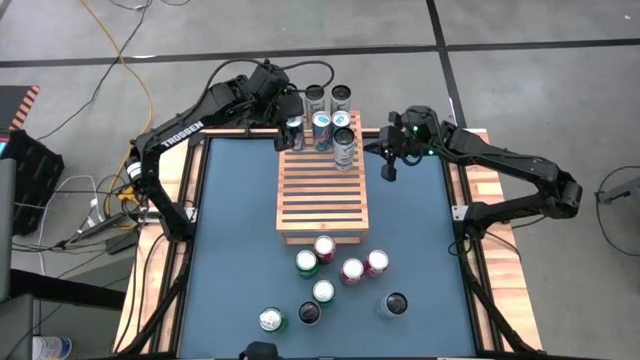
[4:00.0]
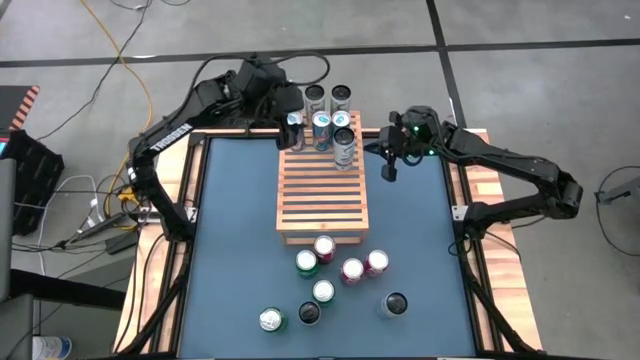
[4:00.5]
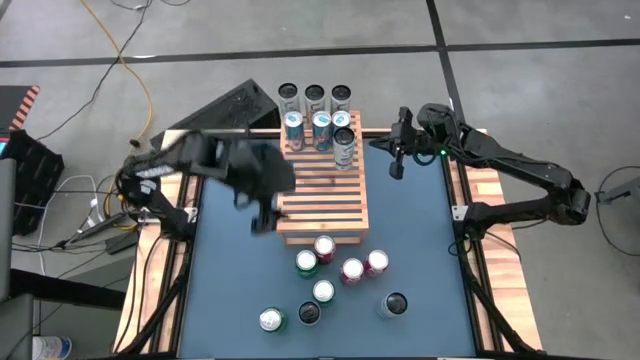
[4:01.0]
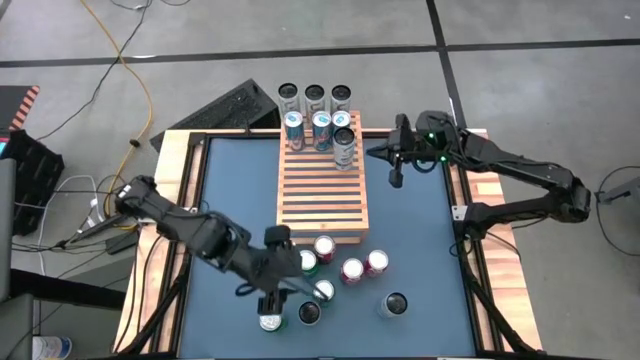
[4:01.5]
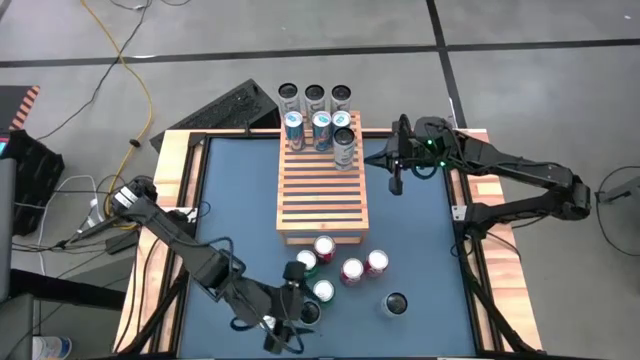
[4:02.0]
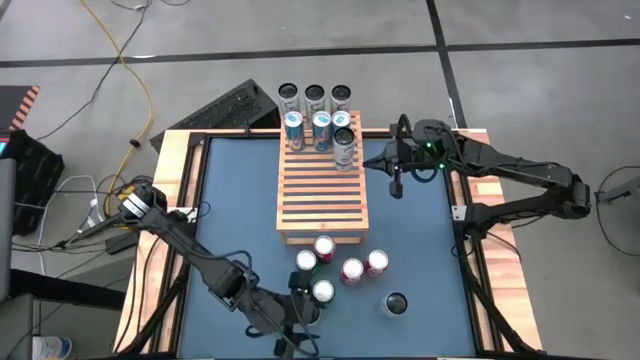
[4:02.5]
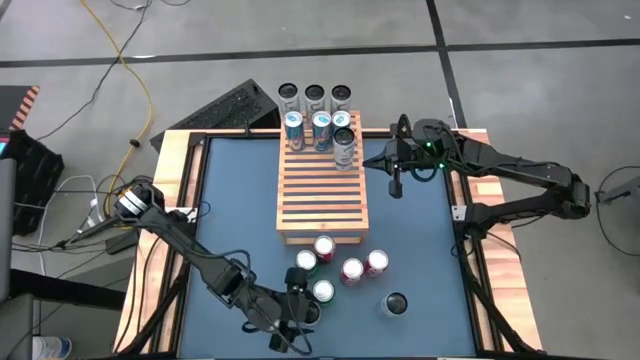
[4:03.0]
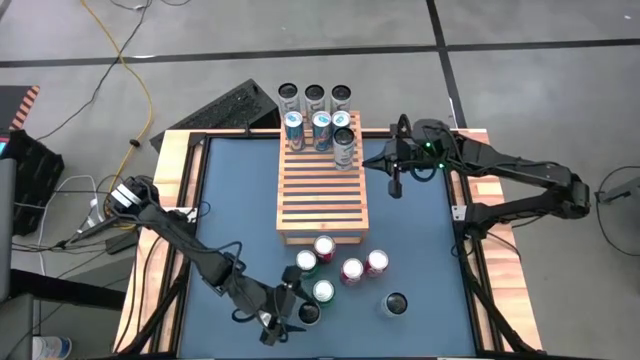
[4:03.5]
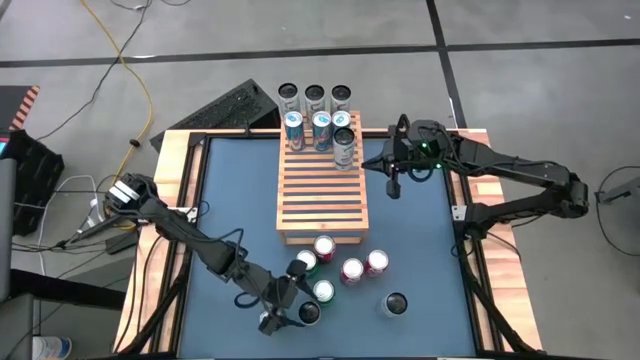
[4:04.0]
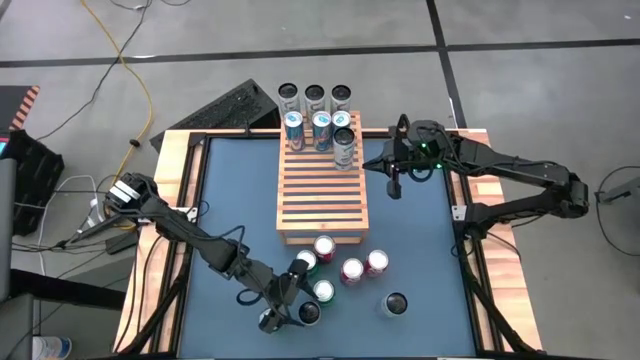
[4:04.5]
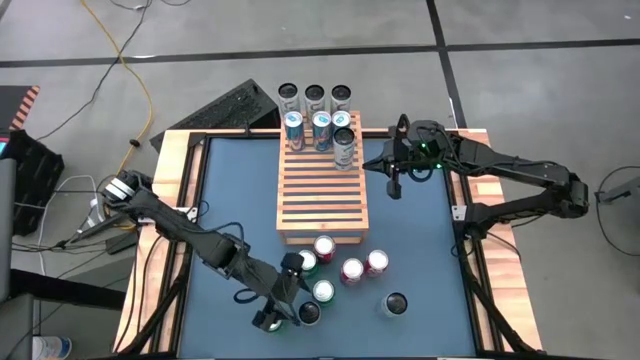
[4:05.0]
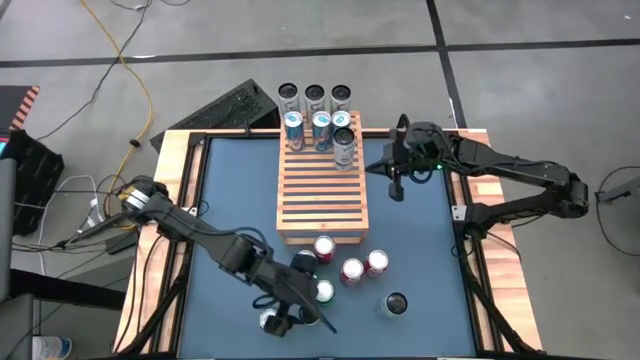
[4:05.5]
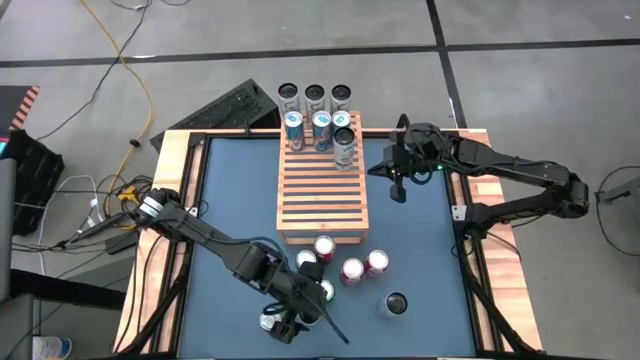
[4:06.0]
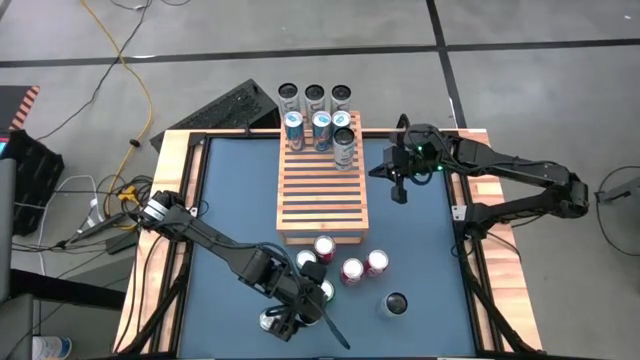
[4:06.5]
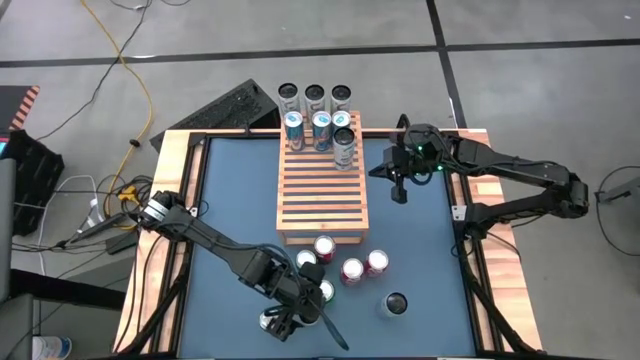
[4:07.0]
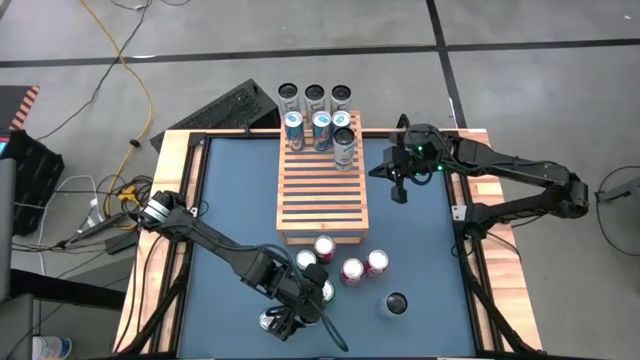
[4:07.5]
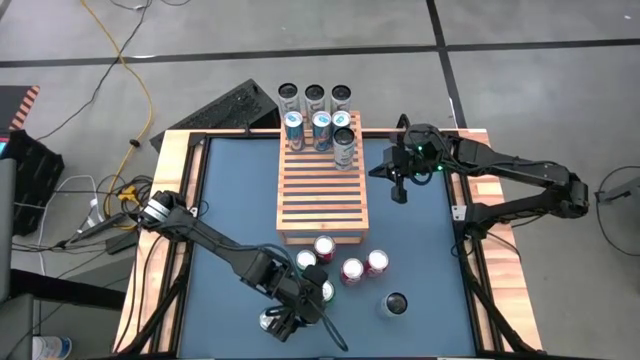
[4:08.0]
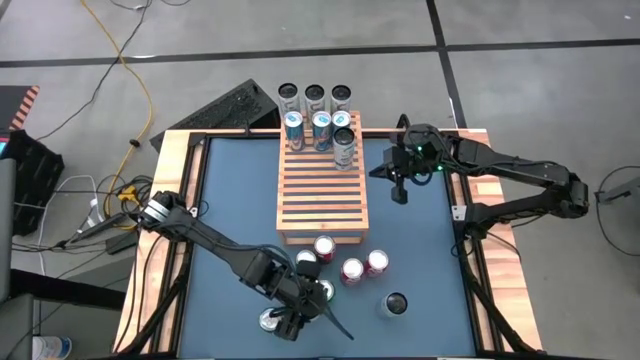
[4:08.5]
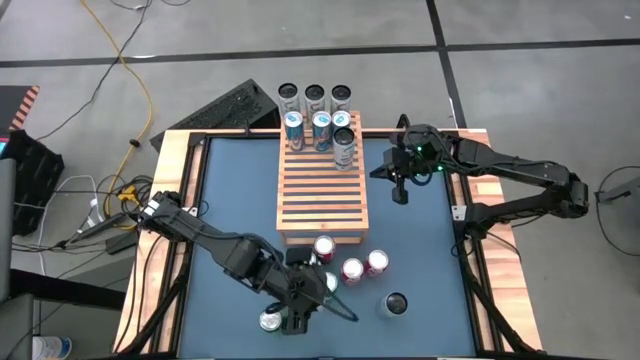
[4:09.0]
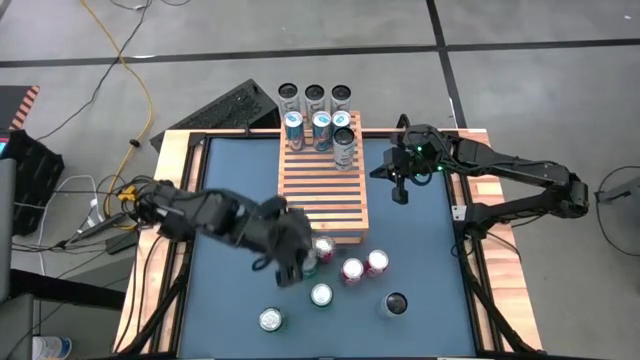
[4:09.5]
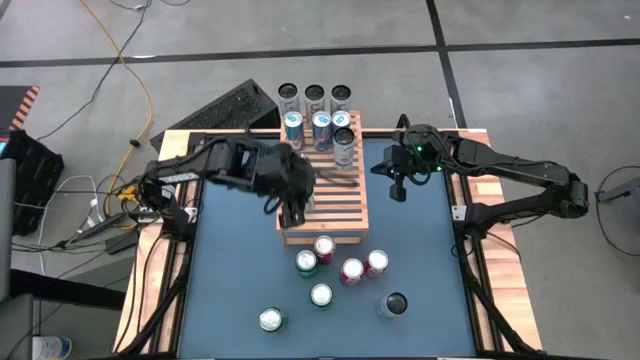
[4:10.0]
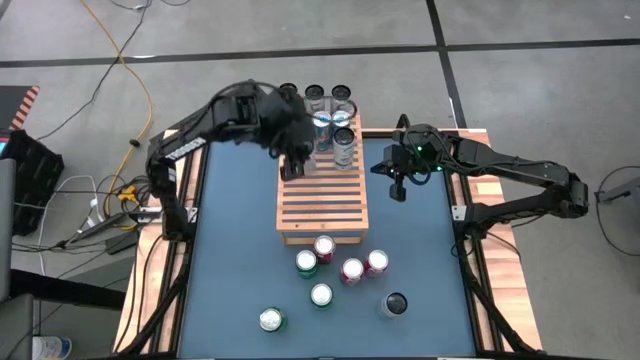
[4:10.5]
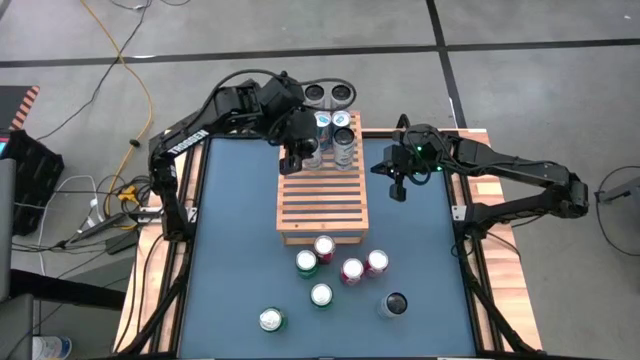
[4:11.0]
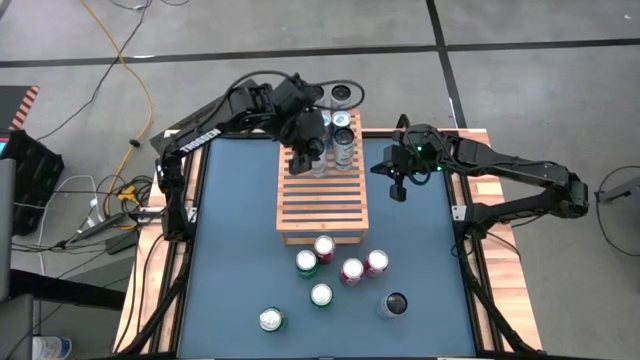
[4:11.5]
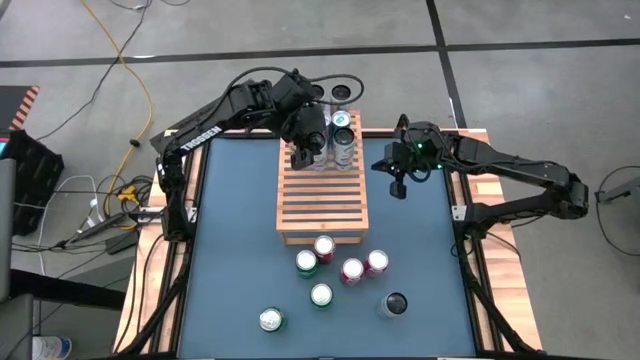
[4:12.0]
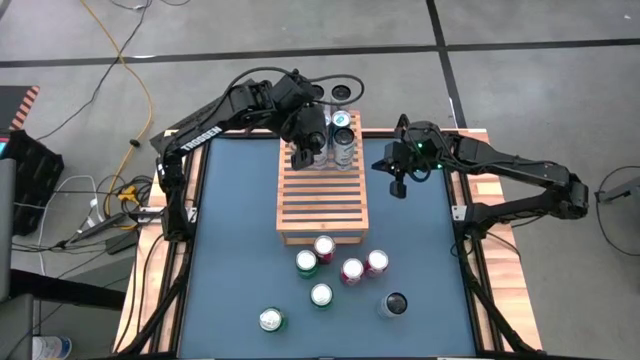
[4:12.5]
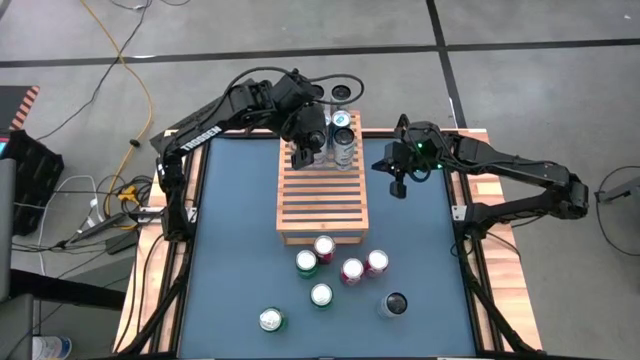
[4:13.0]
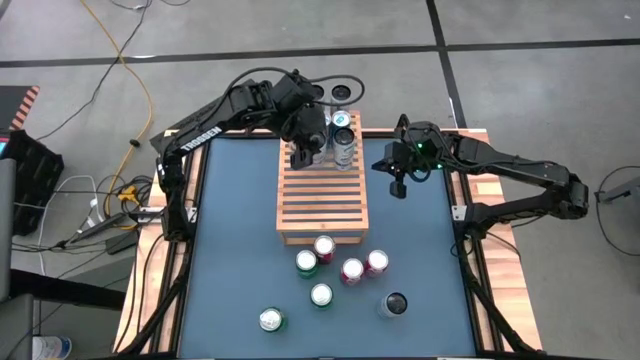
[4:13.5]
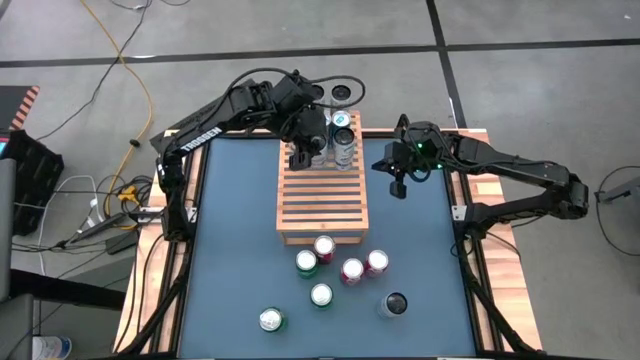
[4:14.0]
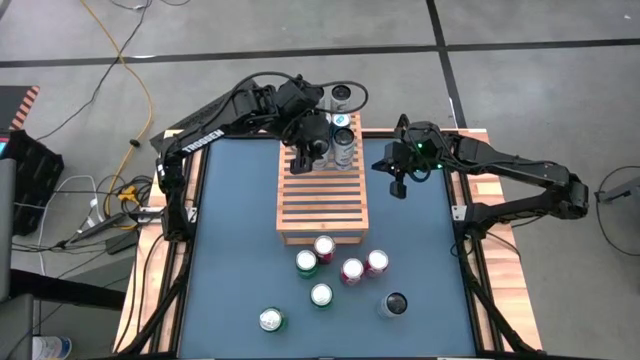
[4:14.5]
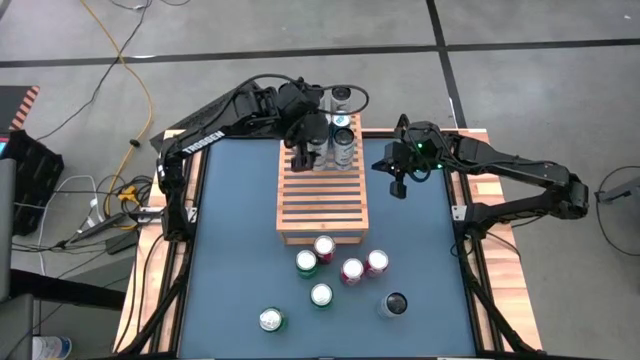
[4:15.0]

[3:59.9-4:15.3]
Task: Place canned beverage on shelf
Put the left white blue soda can on the shelf aligned with the other white blue soda can

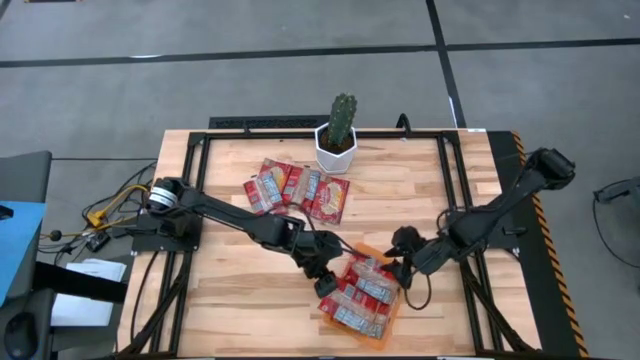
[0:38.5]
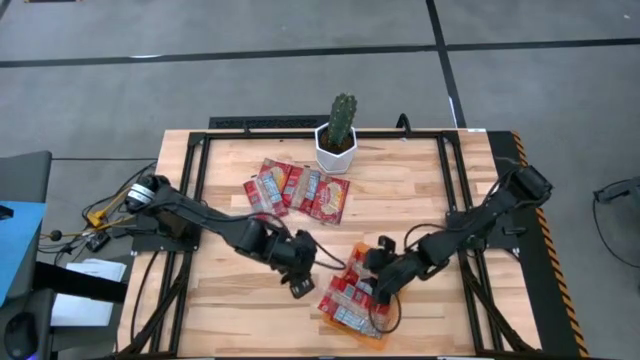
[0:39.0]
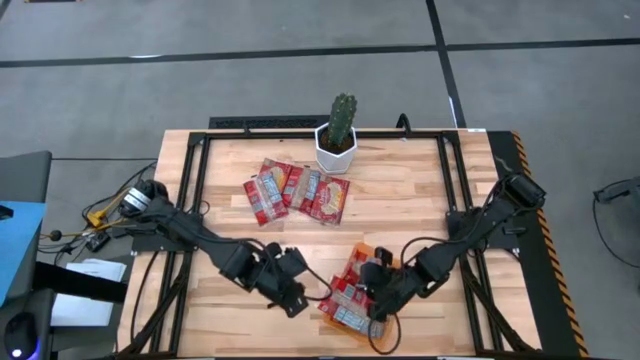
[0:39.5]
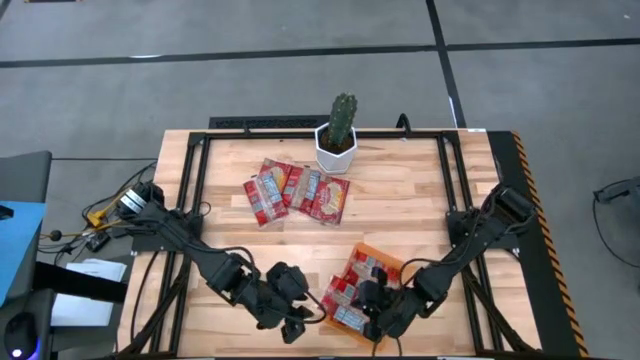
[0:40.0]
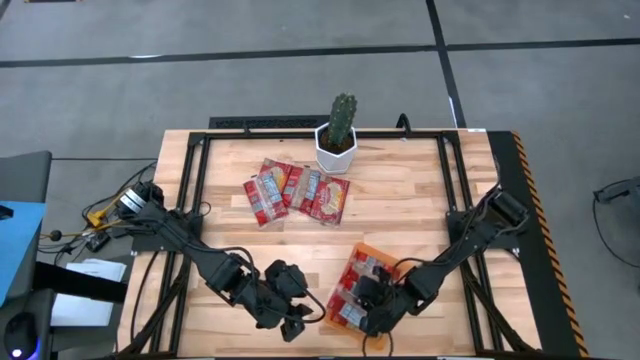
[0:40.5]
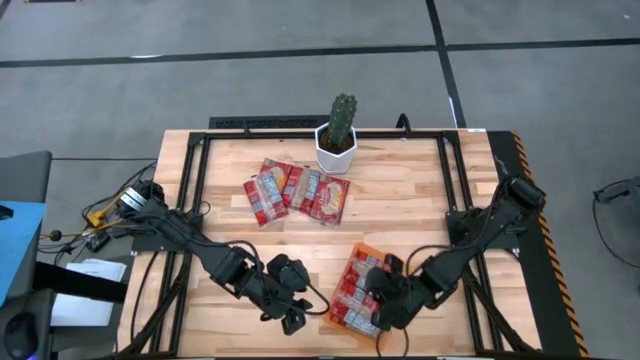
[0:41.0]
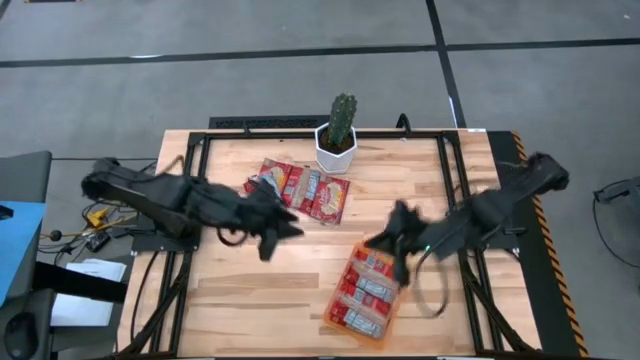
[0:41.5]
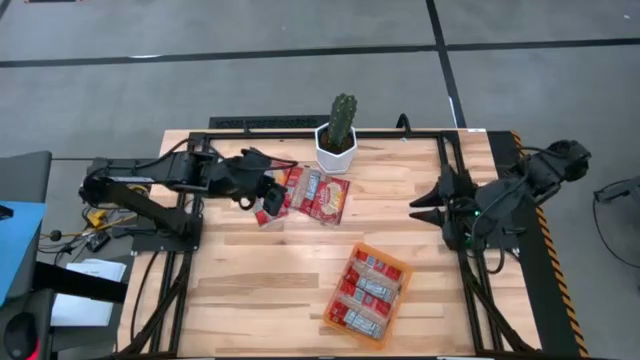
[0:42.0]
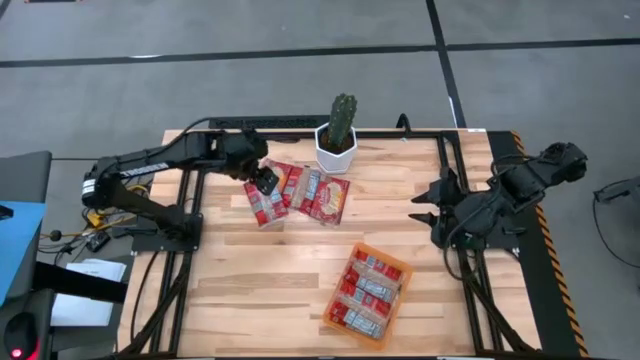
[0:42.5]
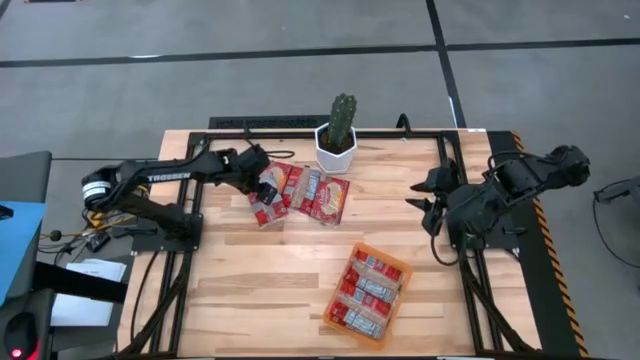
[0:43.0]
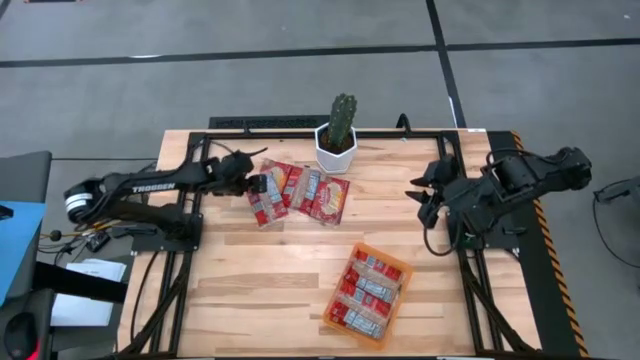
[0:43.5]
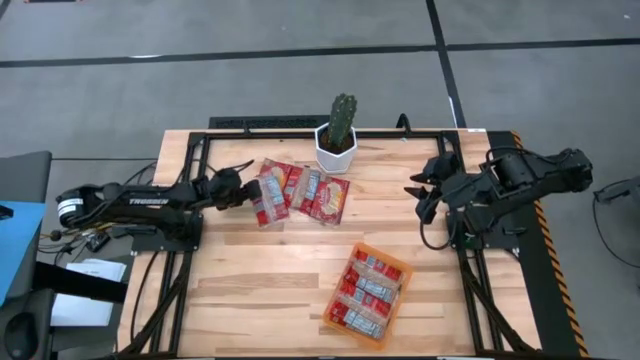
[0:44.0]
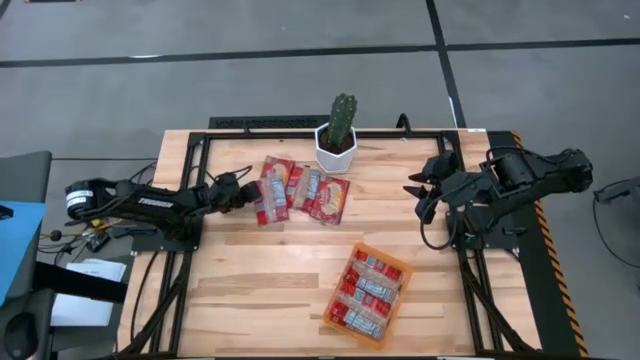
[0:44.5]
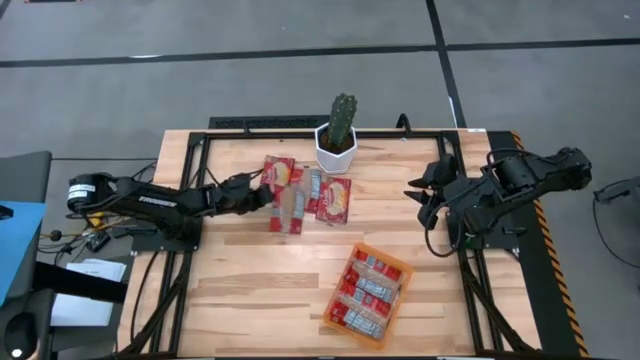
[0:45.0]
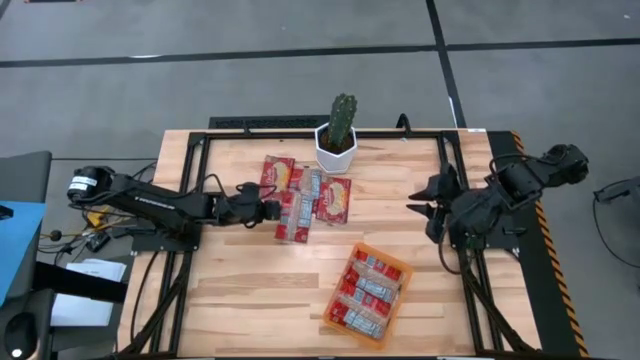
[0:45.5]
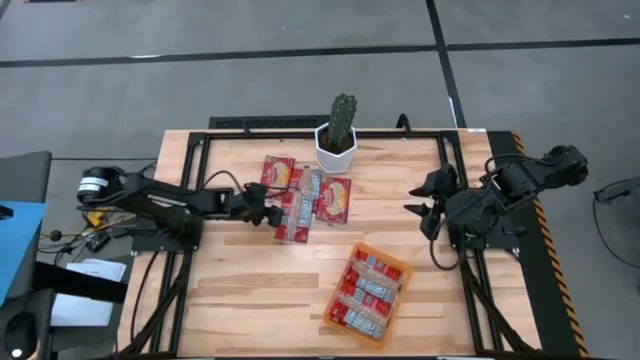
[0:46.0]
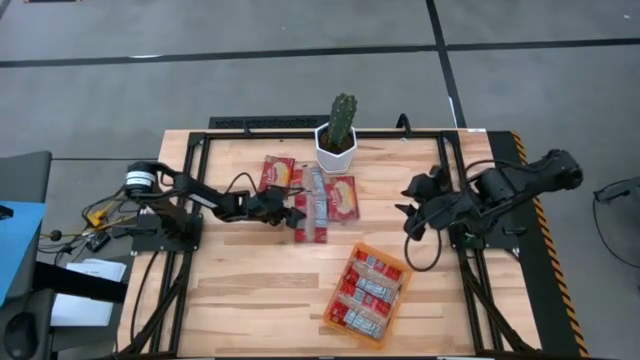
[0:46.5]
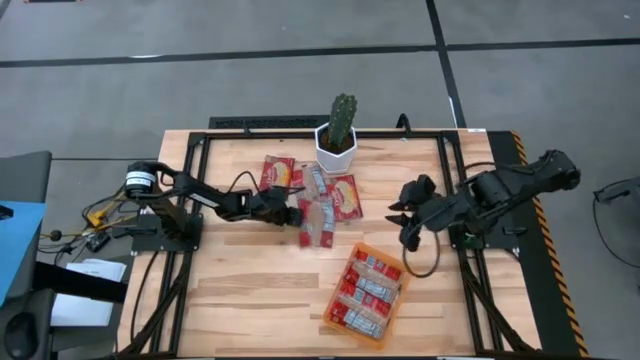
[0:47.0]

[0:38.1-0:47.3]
Task: Sort popcorn bags into baskets
Put the red popcorn bag into the orange container
